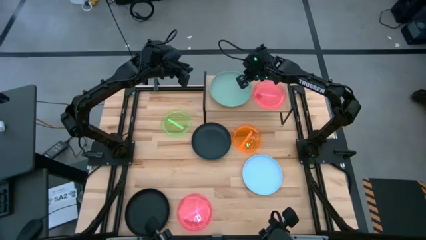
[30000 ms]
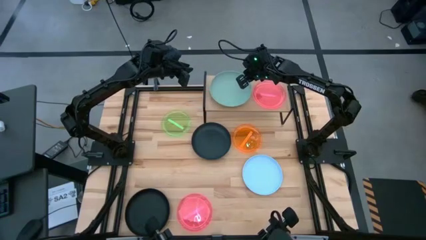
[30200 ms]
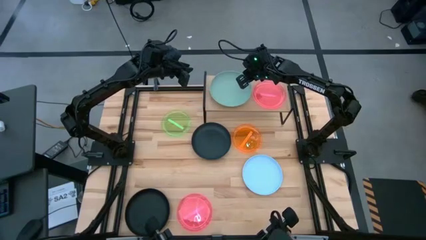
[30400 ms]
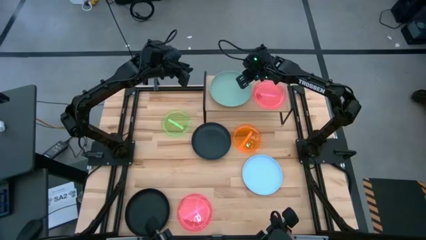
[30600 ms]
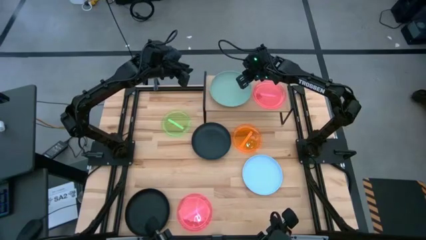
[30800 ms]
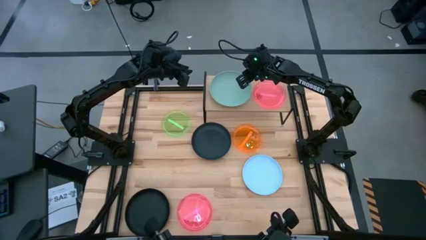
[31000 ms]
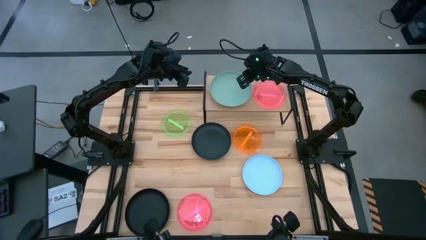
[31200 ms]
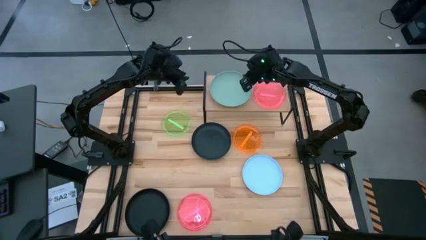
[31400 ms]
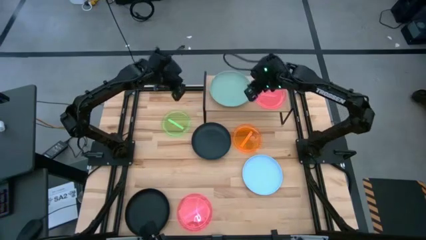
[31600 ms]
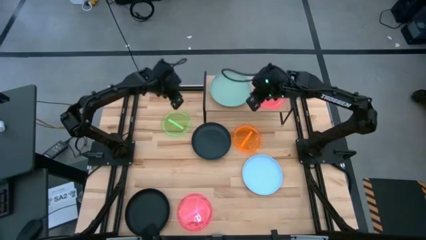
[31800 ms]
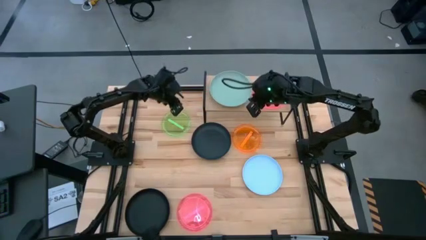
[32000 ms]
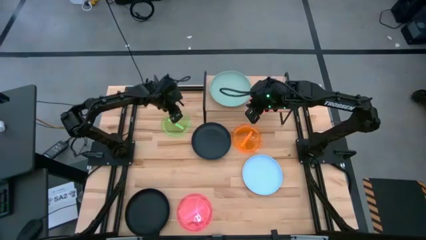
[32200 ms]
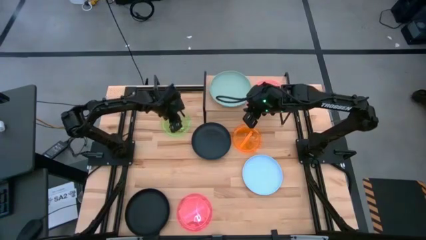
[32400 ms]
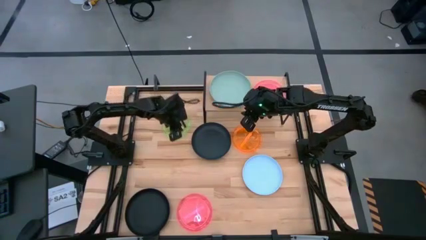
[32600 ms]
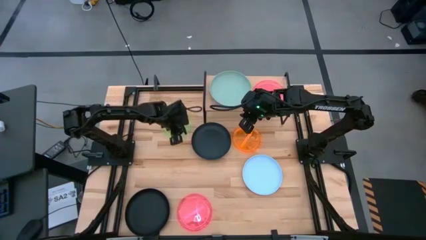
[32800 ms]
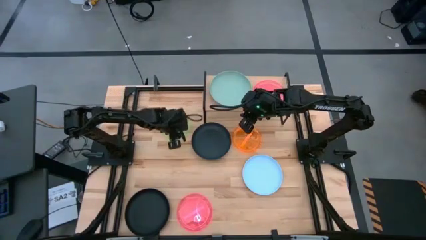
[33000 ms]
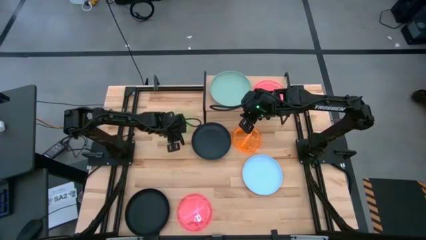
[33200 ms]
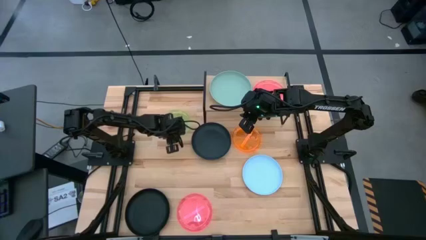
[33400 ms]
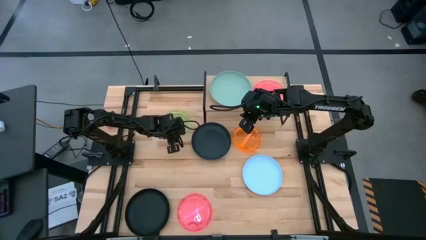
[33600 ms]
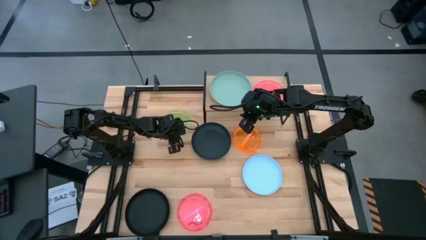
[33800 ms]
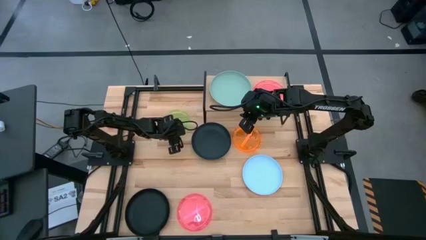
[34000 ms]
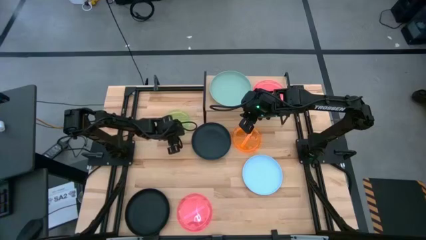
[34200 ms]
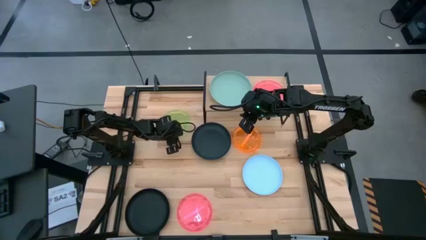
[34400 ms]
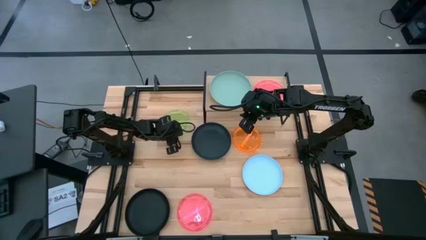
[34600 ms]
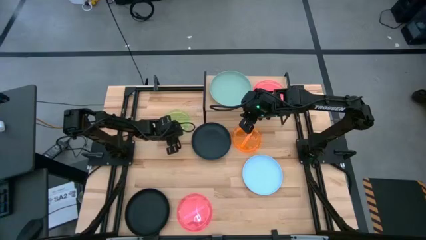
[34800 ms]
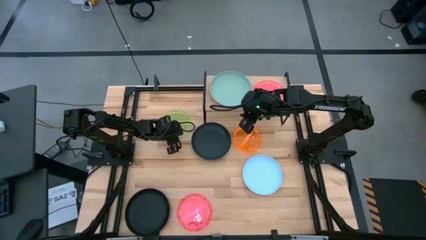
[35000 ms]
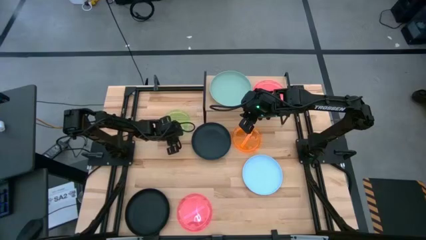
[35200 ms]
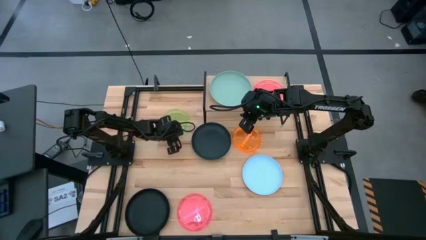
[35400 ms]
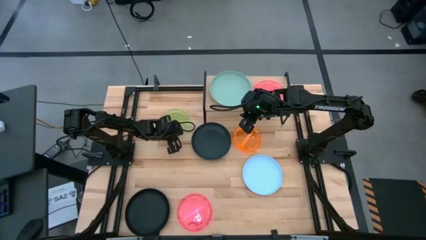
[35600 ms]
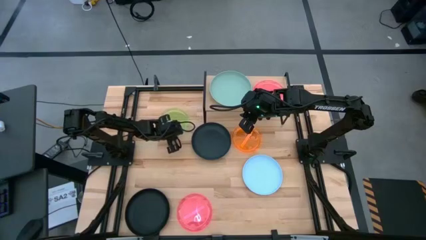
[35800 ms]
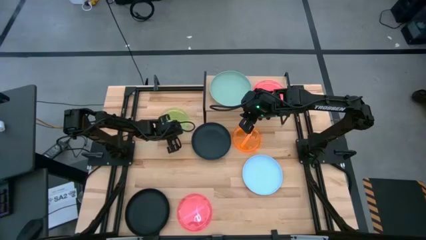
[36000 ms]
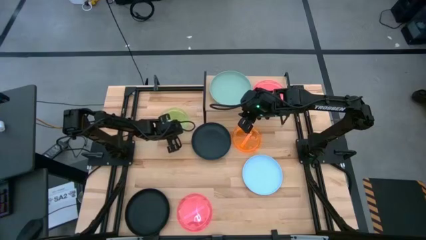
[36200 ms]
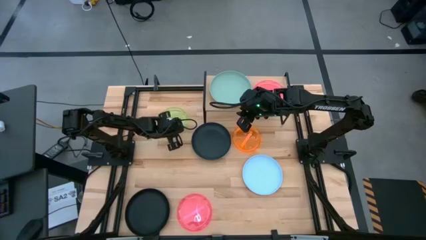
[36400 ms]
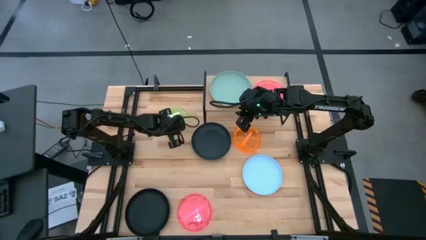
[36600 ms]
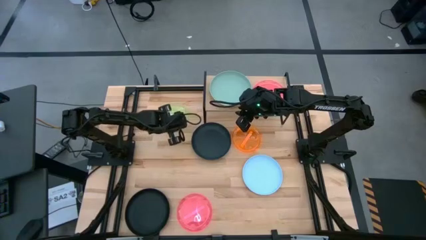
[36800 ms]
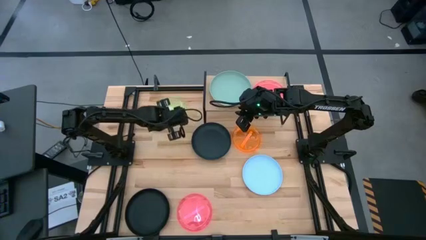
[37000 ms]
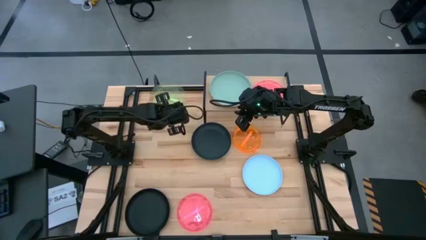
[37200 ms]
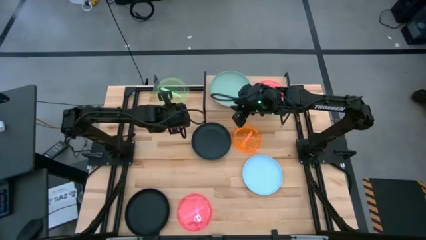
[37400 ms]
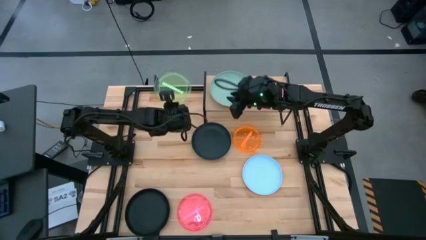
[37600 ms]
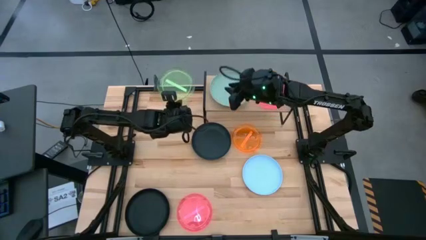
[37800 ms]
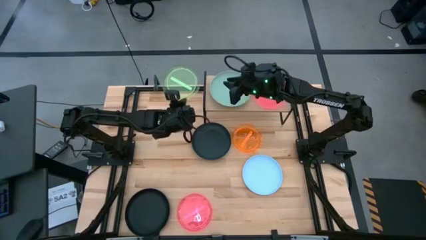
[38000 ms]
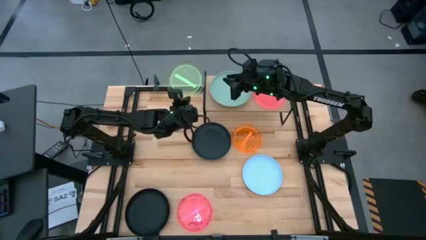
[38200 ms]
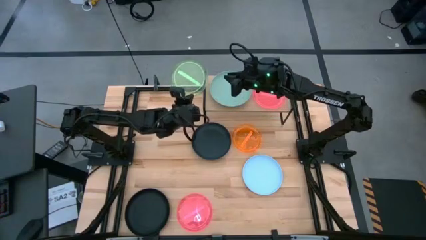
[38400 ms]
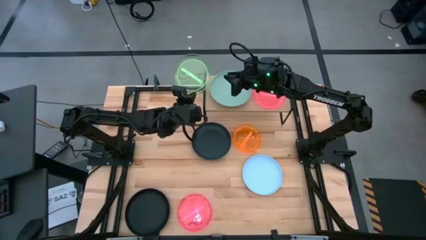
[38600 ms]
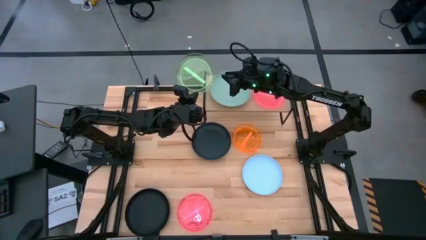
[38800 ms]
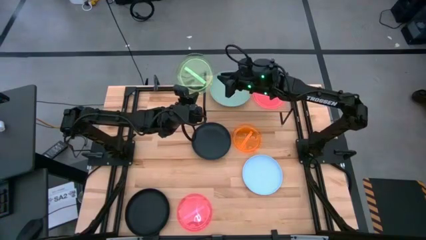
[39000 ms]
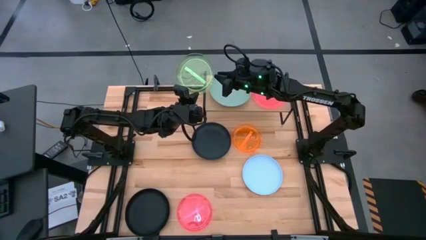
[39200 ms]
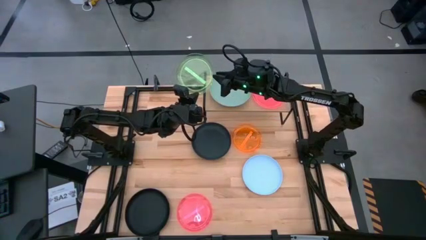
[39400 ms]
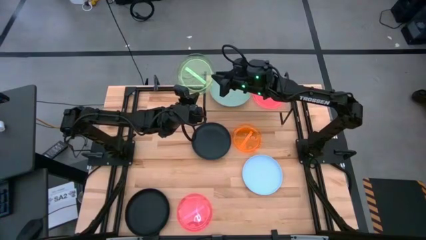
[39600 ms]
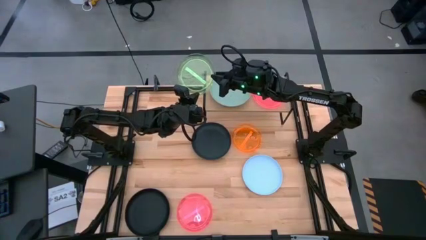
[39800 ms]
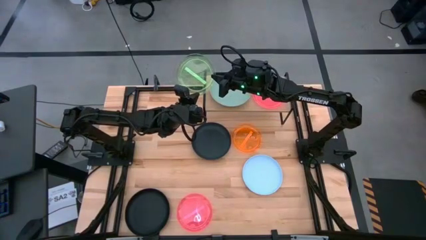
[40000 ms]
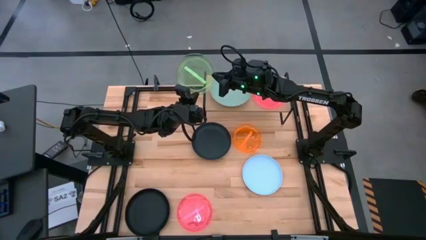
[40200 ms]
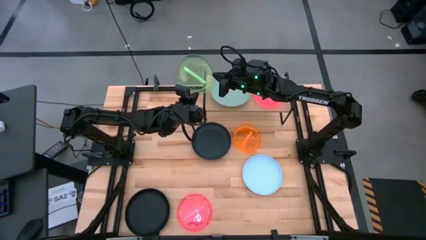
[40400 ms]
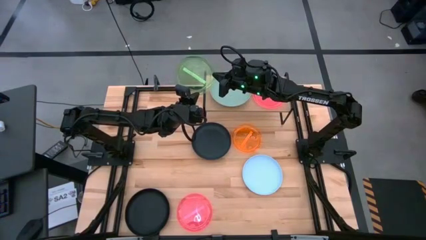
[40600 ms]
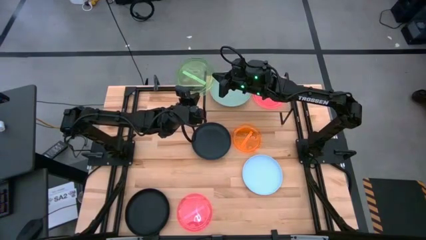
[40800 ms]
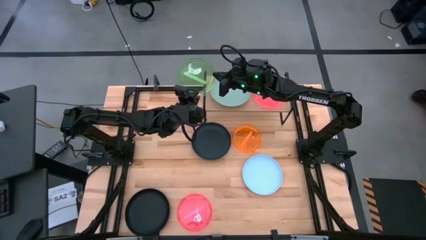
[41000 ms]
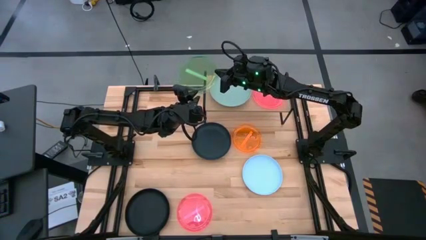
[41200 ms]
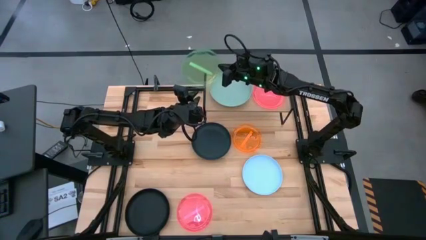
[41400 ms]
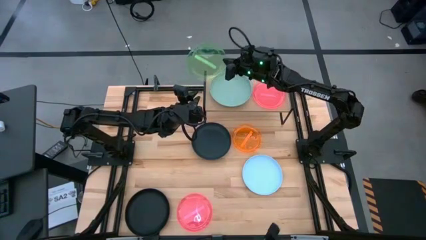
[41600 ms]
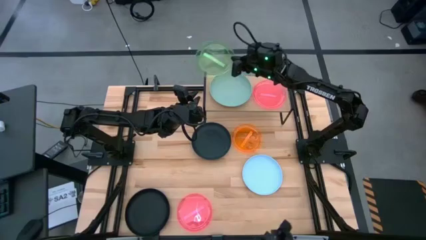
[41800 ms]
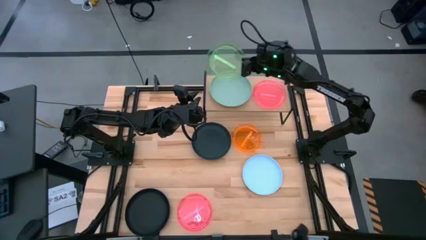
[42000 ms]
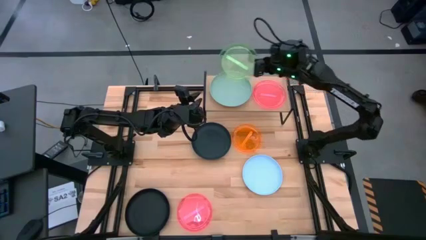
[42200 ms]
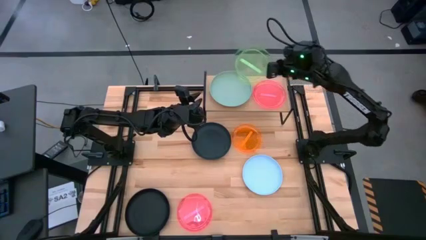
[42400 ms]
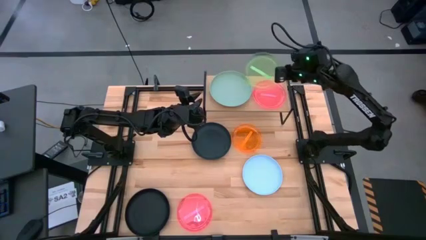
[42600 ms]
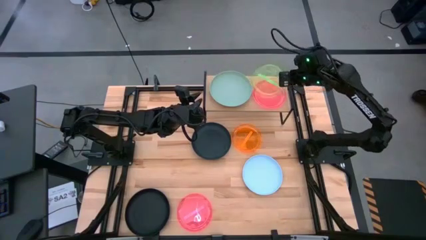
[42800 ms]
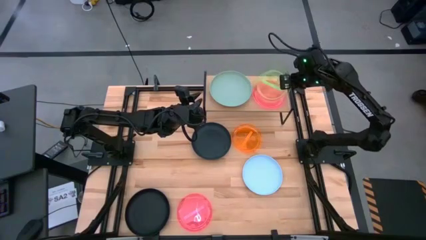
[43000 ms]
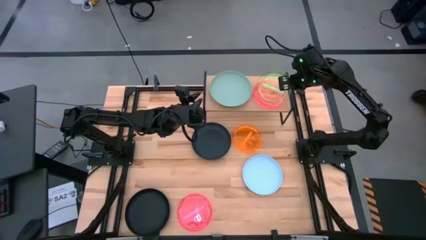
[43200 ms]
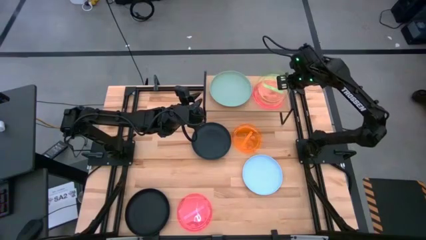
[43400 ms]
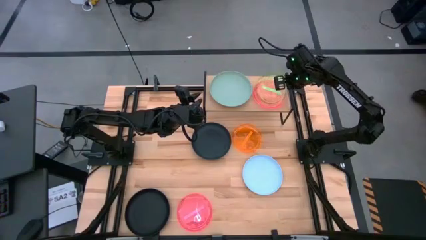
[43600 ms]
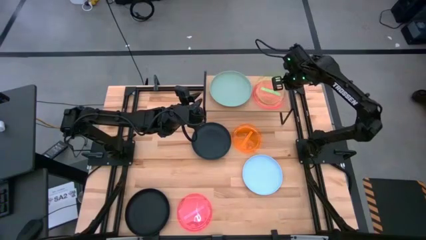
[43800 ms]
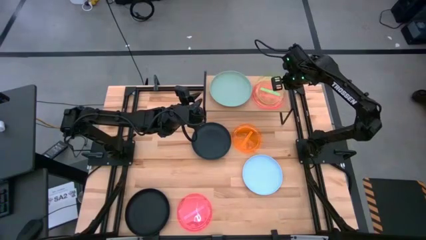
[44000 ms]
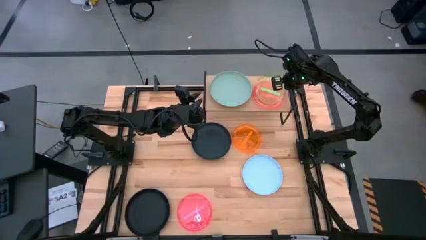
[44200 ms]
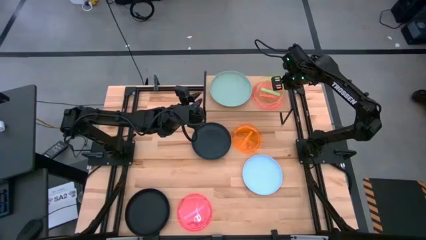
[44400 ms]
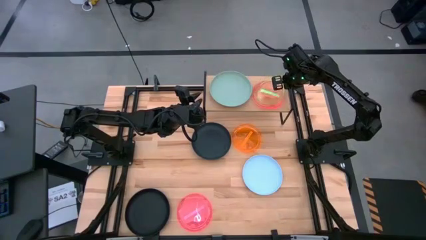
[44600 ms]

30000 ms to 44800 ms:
Task: Place and stack plates onto a shelf
Stack the green plate on top of the pink plate on the shelf
